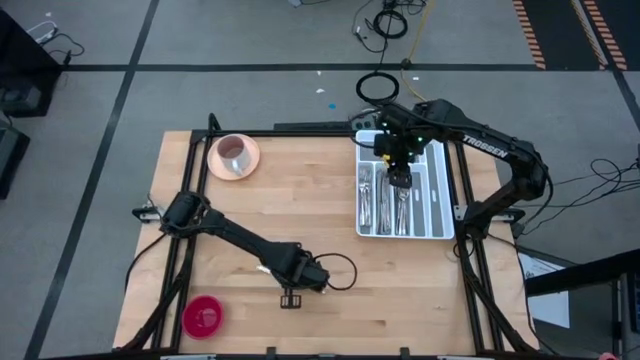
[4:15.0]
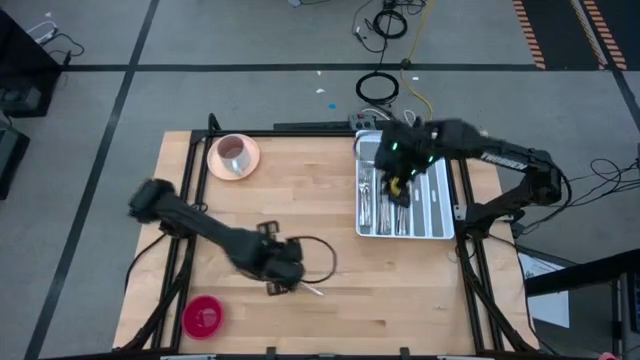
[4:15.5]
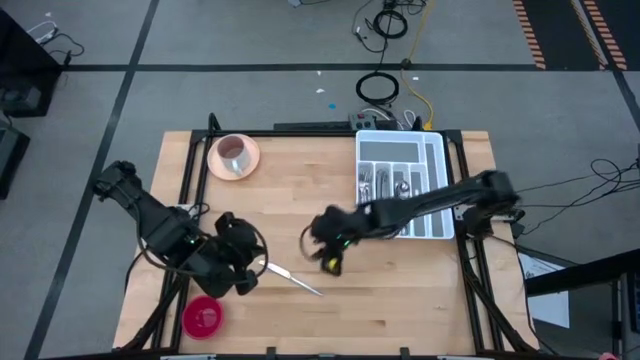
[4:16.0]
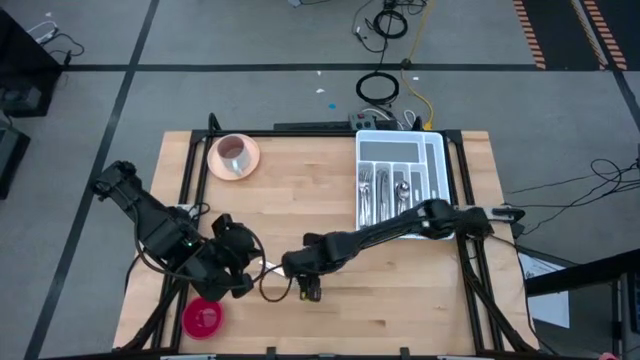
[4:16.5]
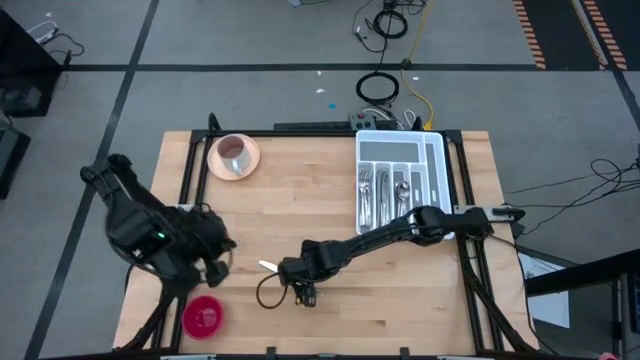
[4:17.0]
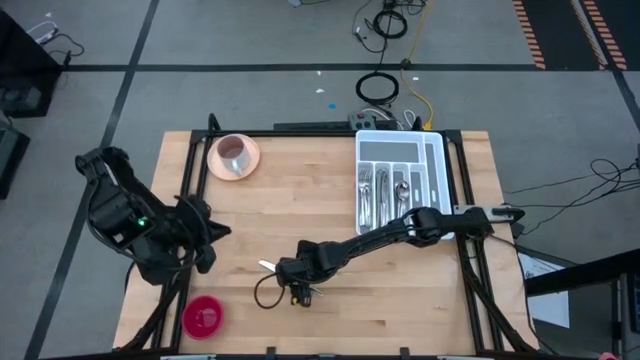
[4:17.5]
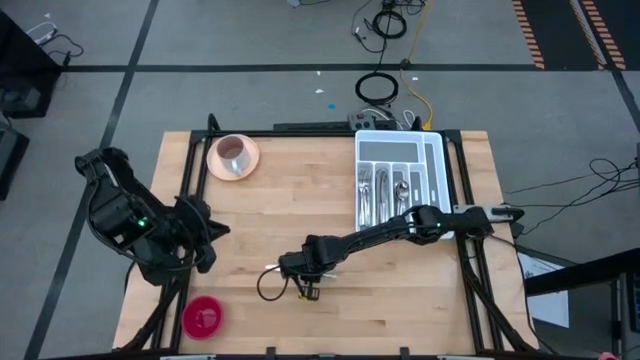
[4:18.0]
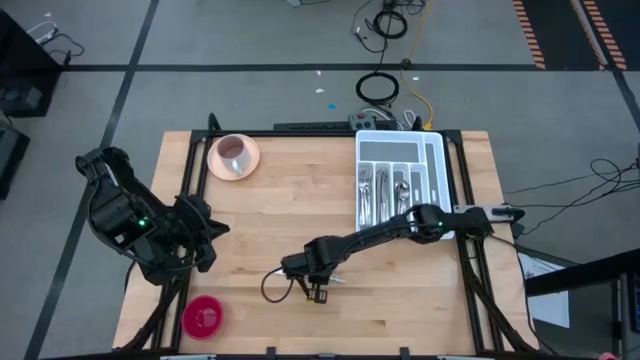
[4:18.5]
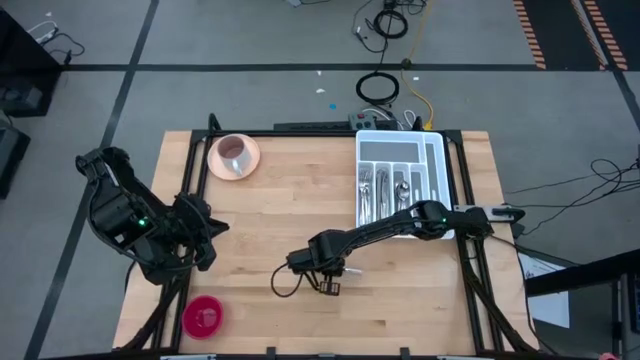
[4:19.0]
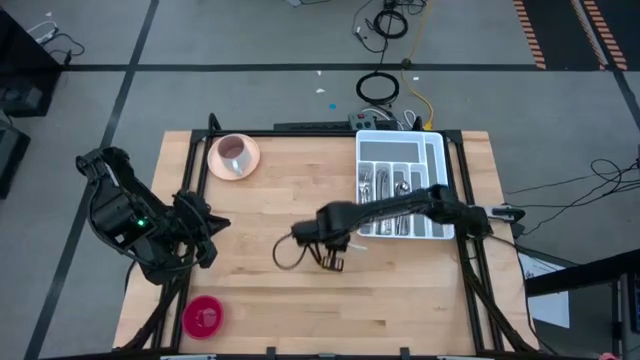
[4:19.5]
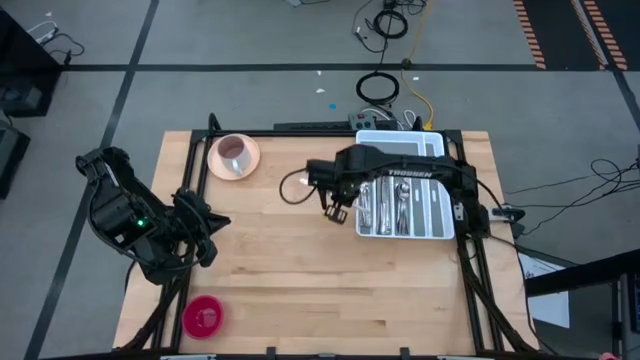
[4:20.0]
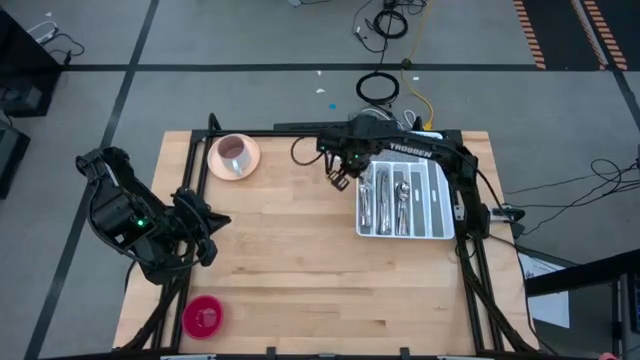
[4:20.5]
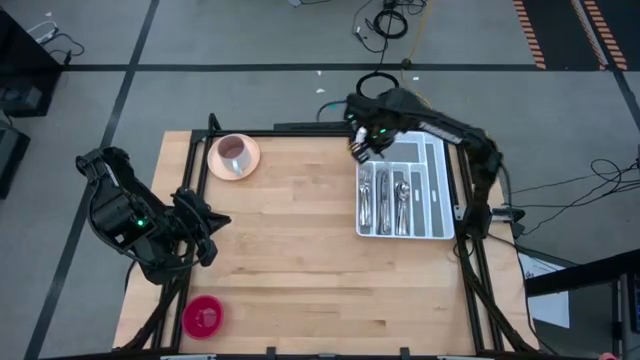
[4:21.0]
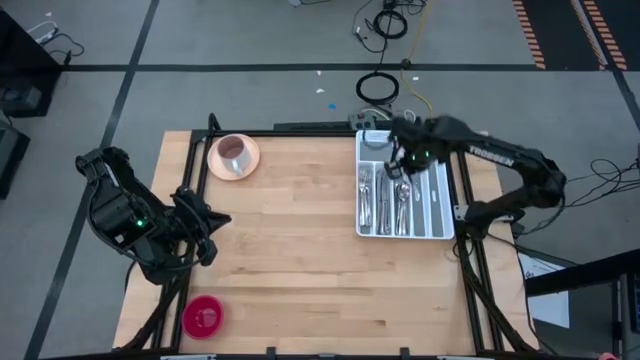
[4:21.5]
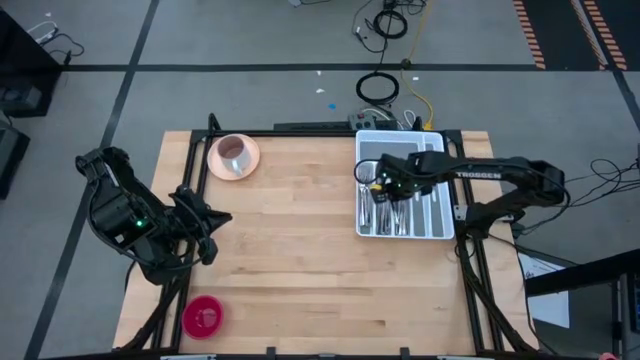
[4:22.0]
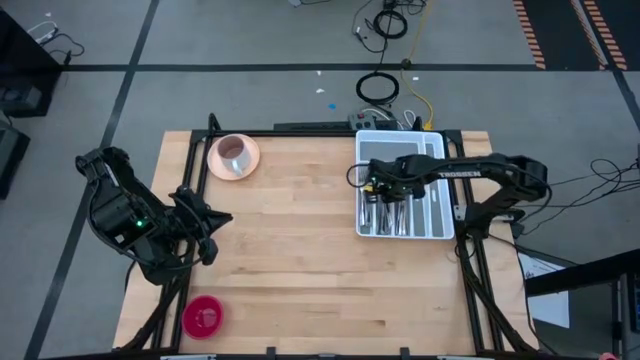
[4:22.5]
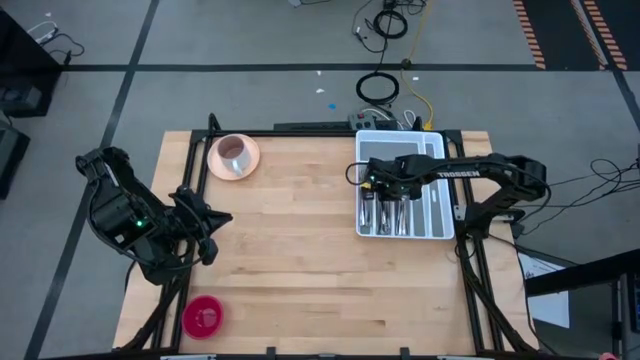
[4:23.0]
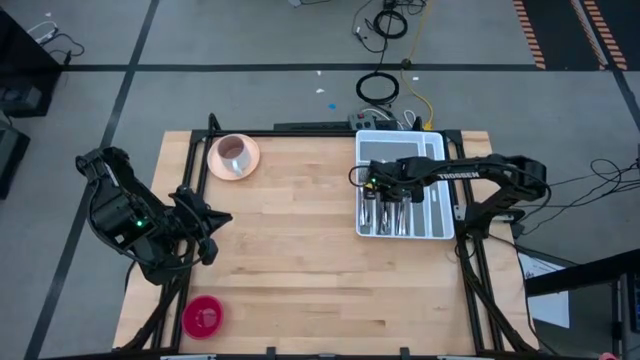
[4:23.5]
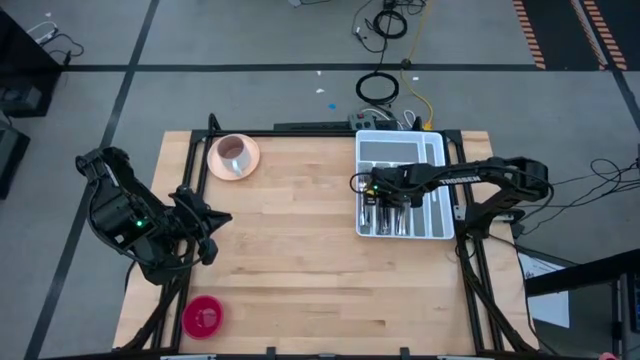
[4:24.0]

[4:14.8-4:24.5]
Task: Sort silverware
Put the silver knife into the white silverware tray

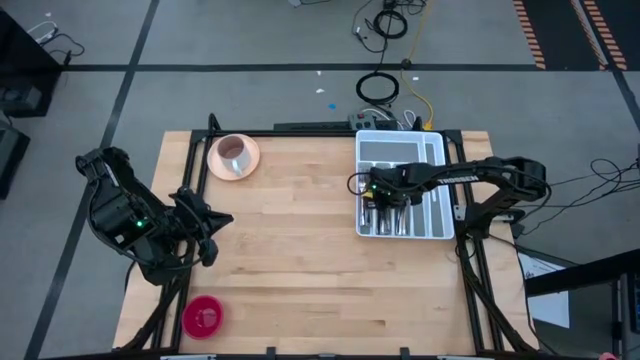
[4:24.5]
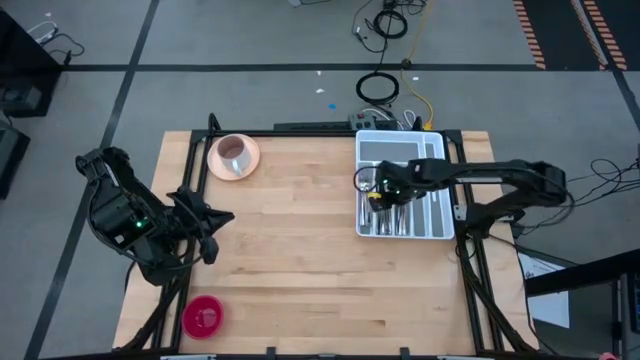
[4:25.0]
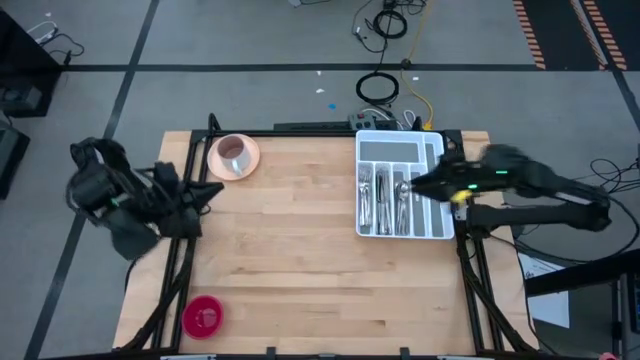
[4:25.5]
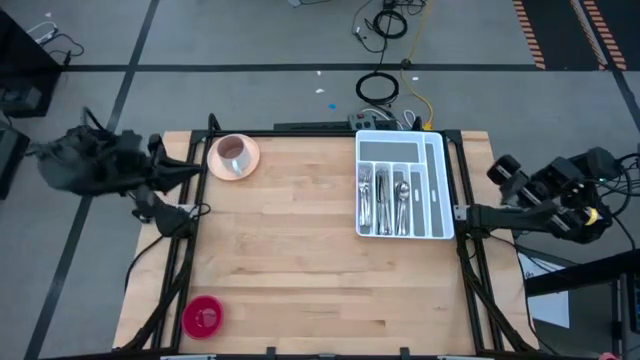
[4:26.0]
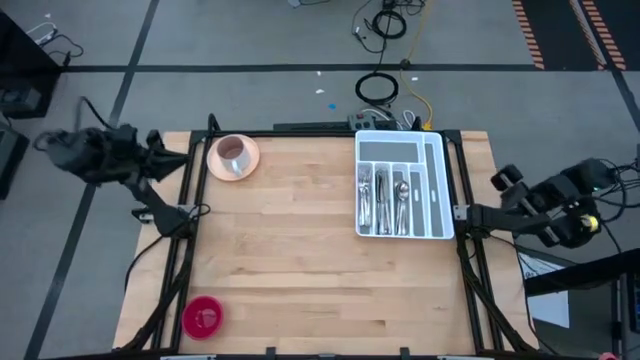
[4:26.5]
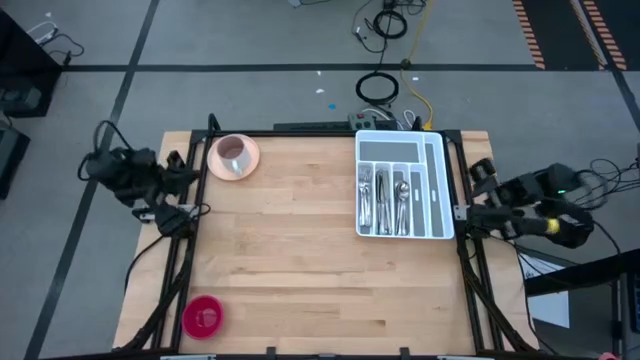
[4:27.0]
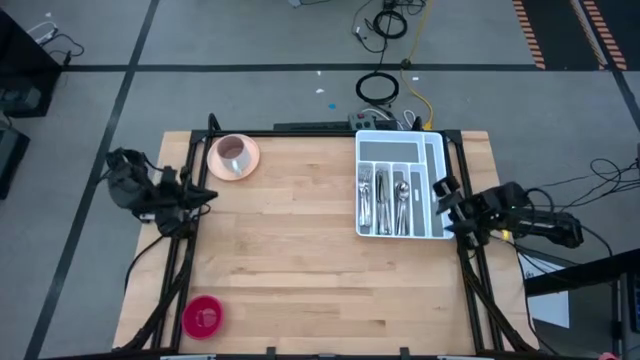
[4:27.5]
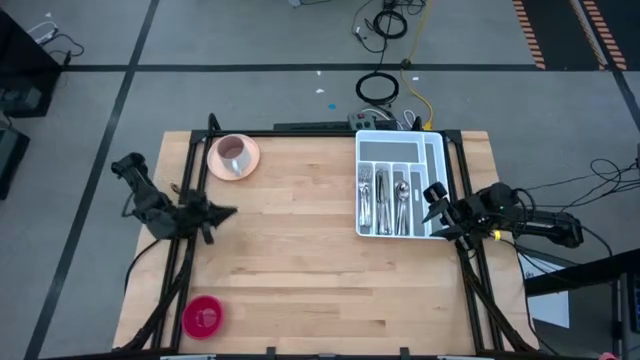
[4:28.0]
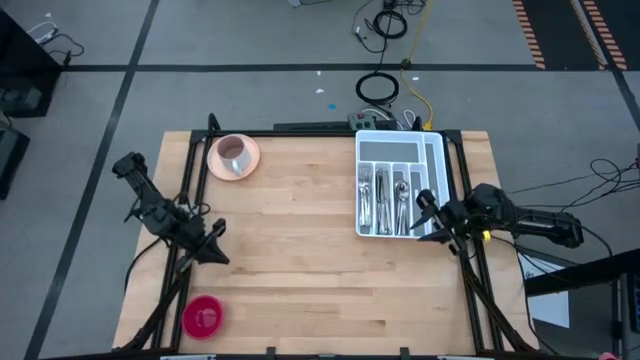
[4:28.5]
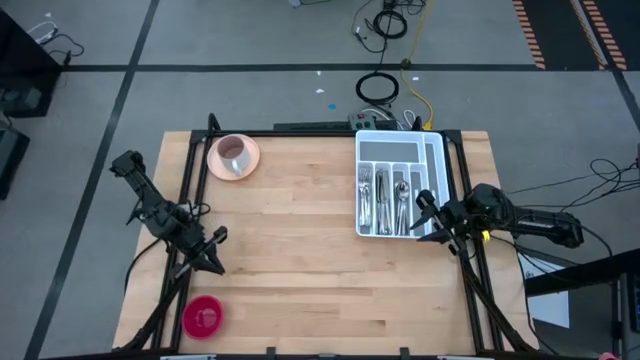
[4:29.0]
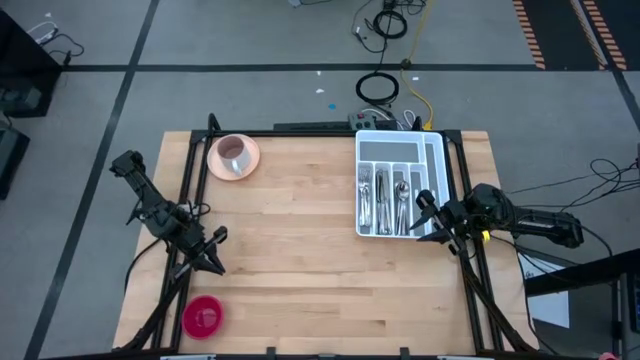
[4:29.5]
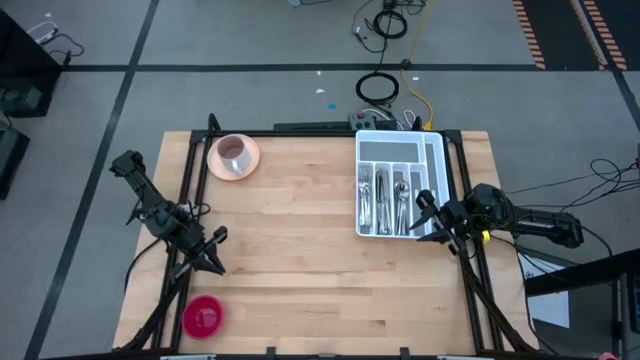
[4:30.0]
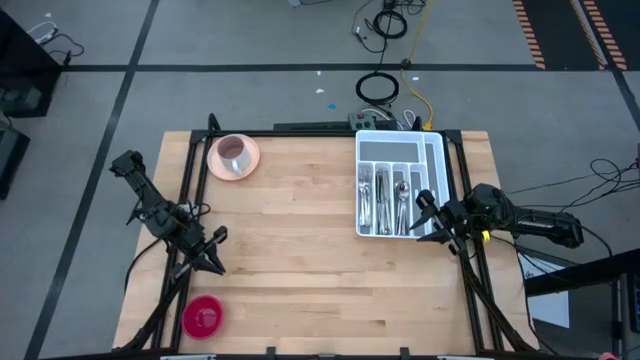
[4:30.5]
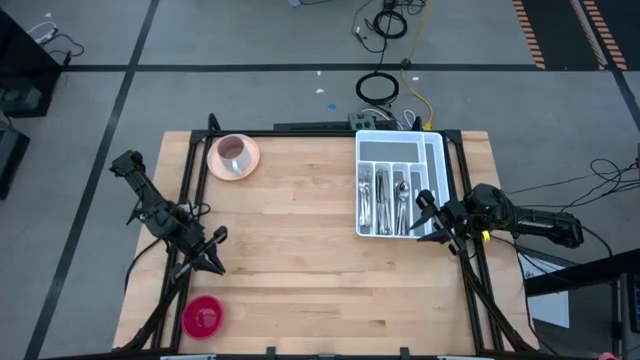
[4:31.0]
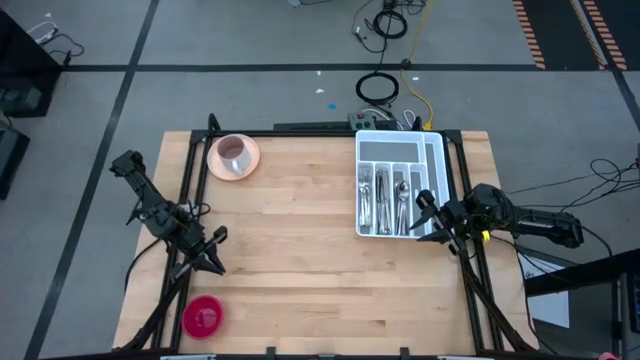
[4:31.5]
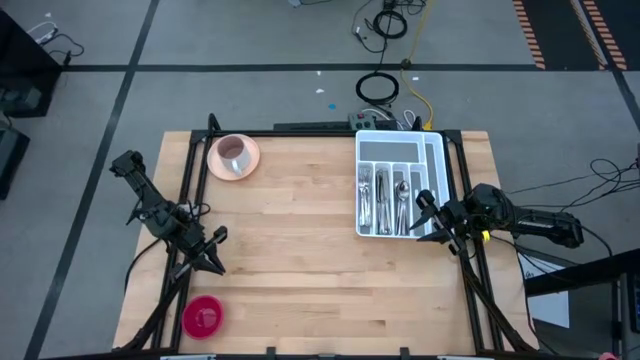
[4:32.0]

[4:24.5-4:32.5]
Return to Home Position

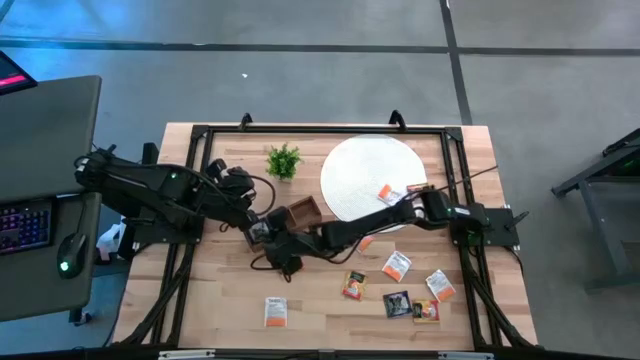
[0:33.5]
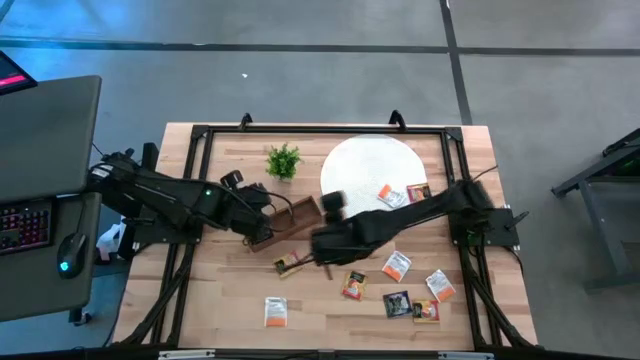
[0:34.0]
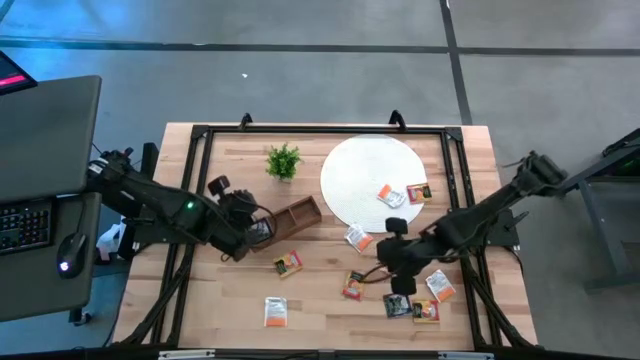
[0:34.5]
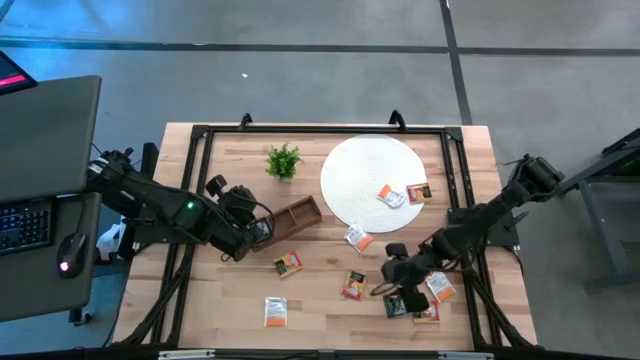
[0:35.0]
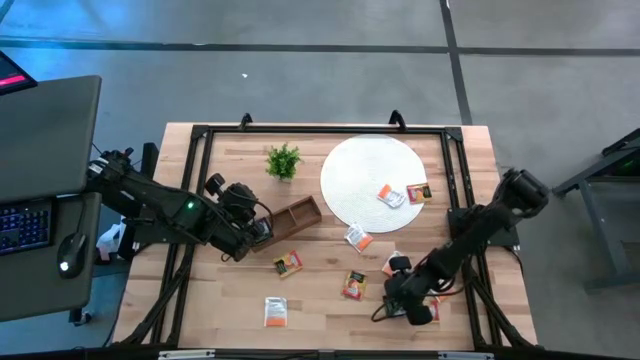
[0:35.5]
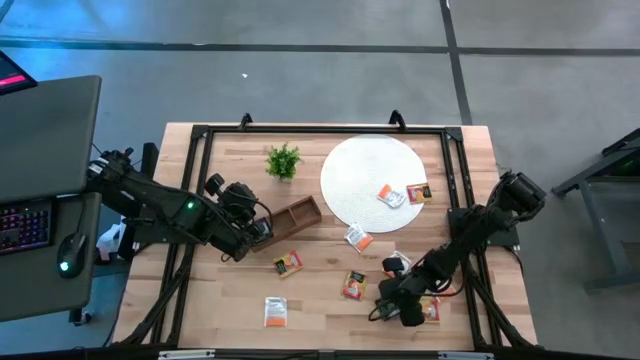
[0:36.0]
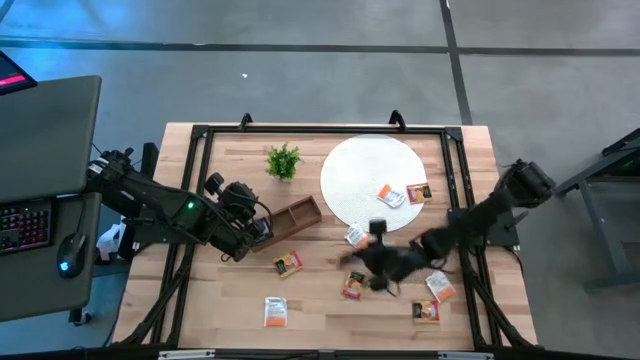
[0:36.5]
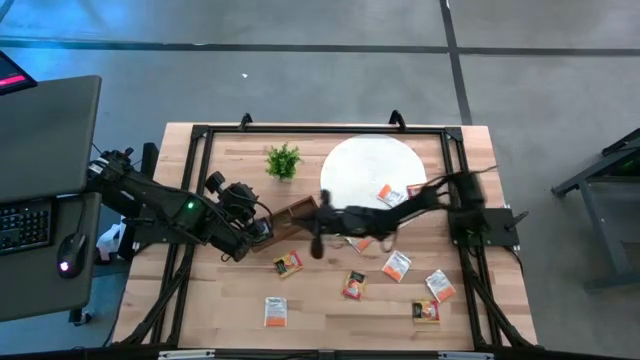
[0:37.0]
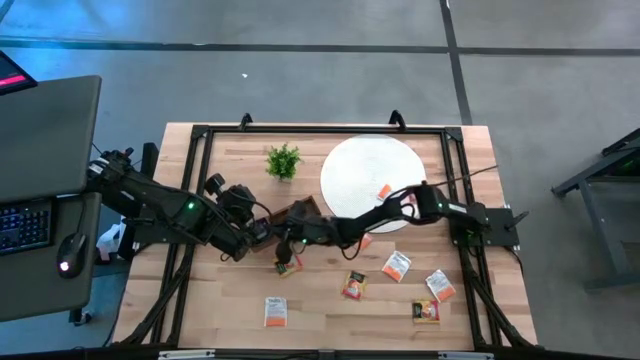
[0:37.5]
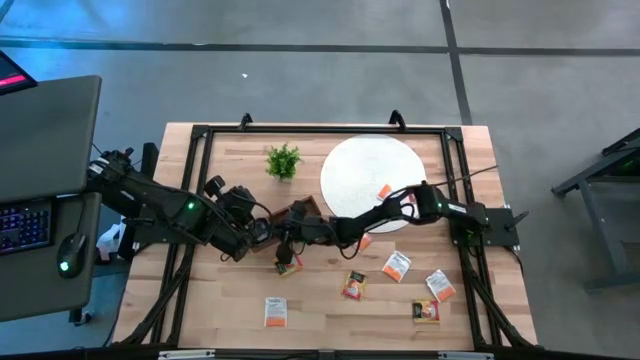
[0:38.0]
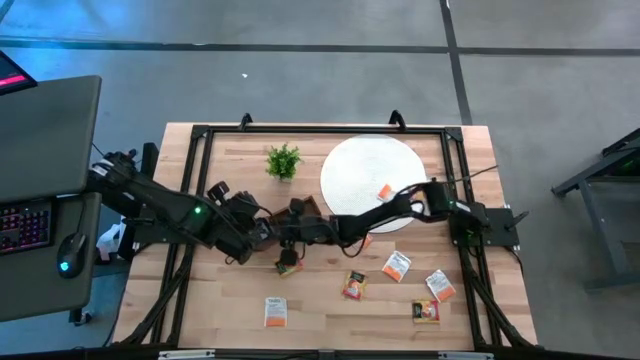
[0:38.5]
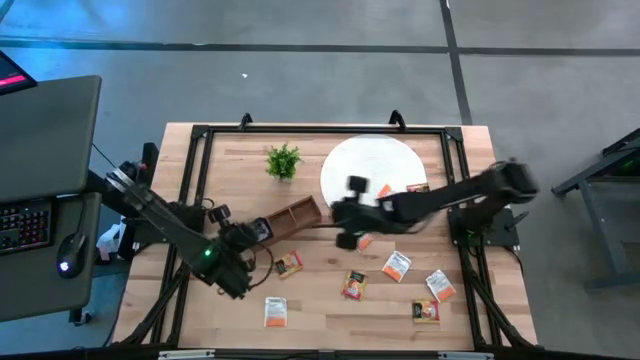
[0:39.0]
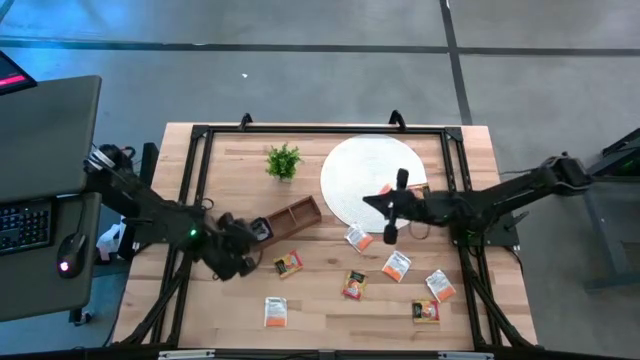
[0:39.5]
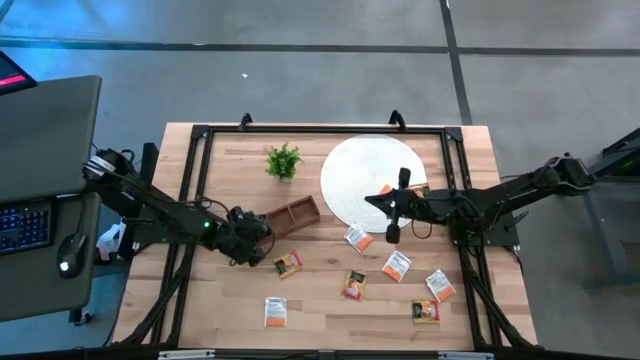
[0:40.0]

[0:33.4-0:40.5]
Task: Pick & Place Tea
Put the purple tea bag into the left section of the wooden organizer
